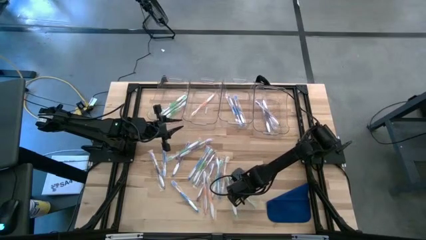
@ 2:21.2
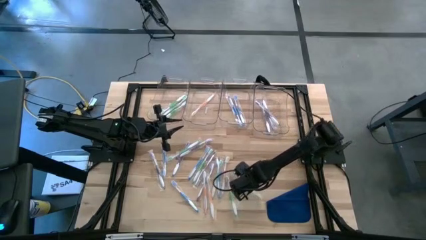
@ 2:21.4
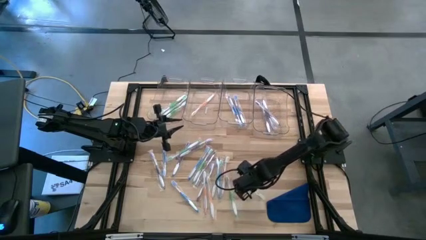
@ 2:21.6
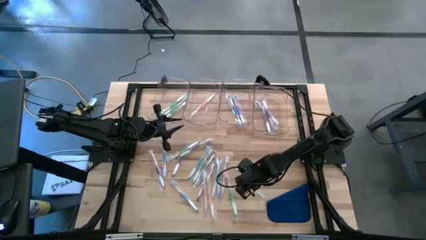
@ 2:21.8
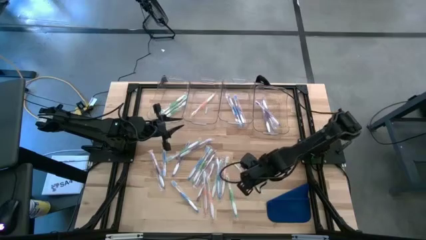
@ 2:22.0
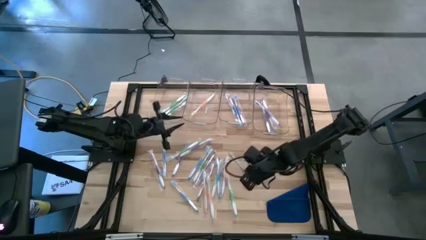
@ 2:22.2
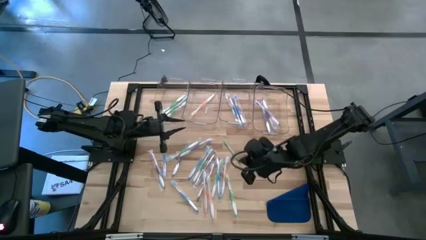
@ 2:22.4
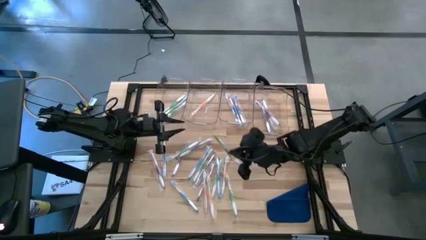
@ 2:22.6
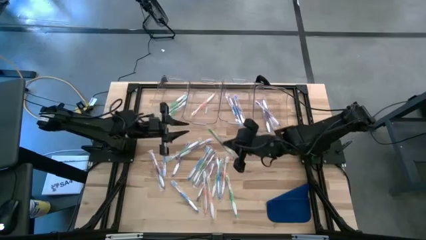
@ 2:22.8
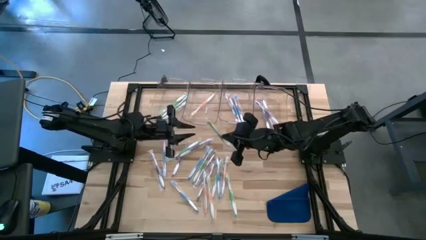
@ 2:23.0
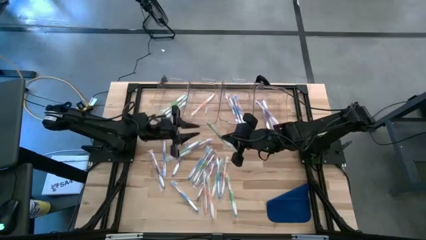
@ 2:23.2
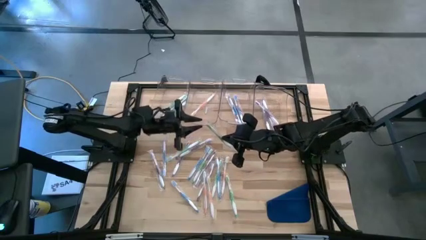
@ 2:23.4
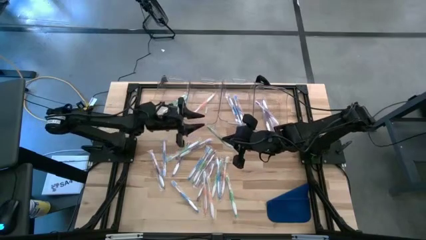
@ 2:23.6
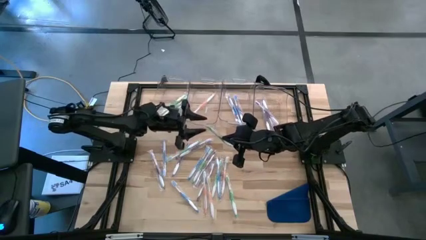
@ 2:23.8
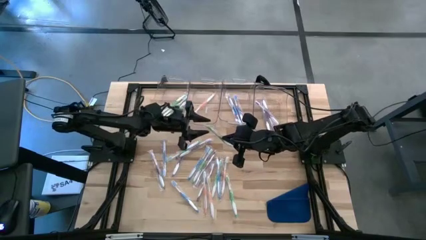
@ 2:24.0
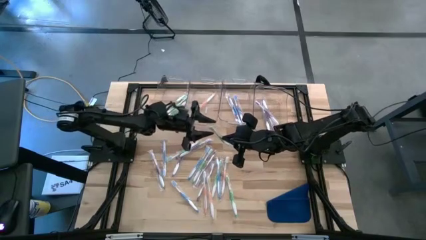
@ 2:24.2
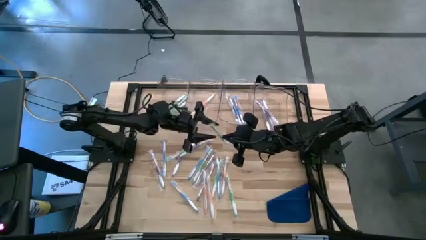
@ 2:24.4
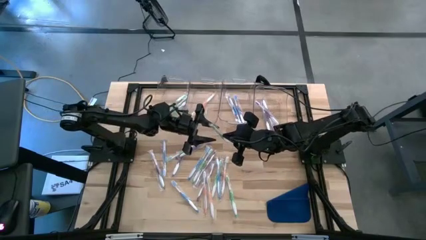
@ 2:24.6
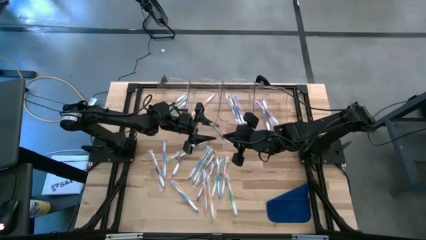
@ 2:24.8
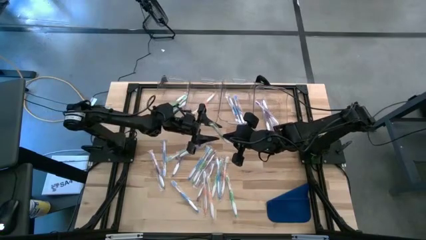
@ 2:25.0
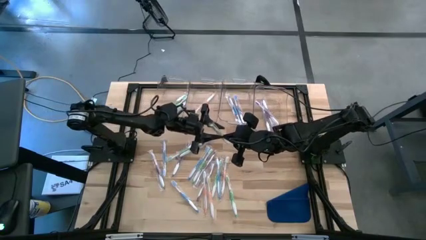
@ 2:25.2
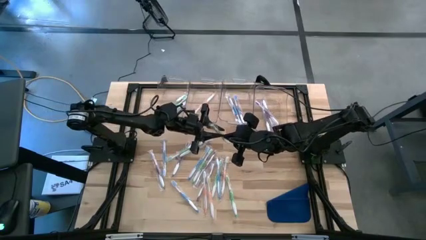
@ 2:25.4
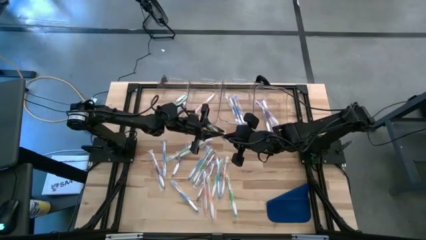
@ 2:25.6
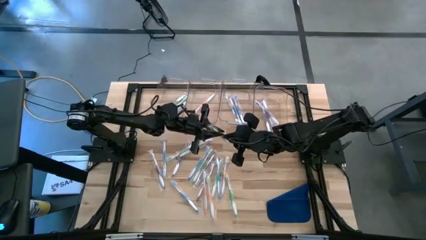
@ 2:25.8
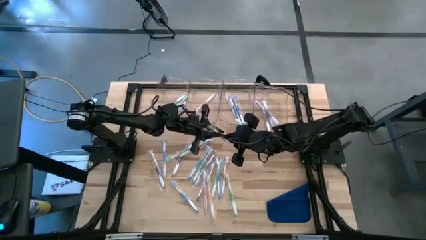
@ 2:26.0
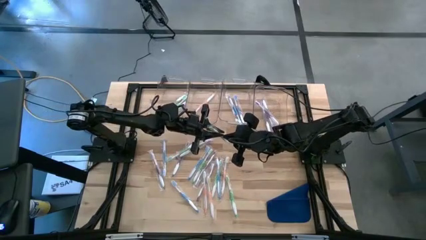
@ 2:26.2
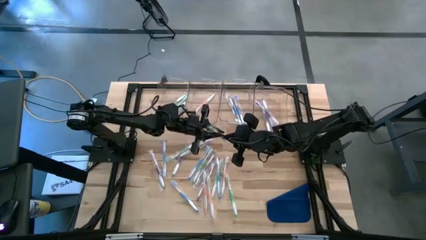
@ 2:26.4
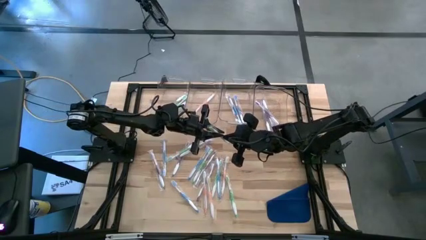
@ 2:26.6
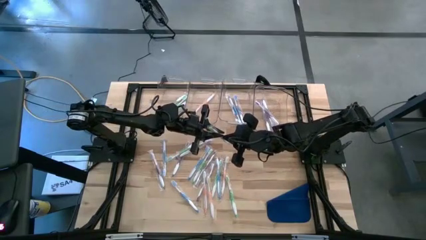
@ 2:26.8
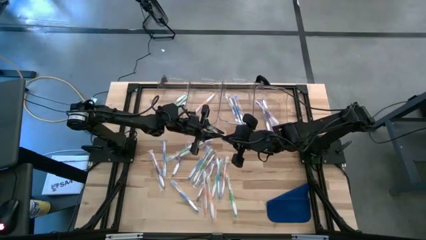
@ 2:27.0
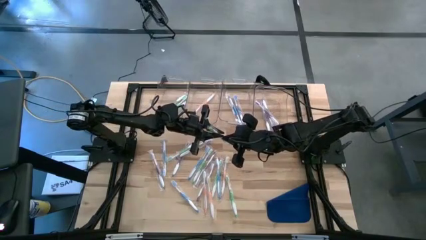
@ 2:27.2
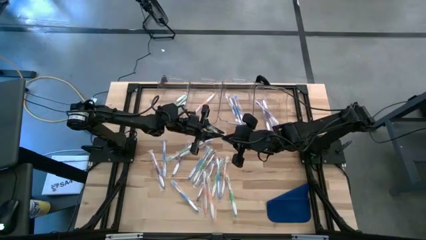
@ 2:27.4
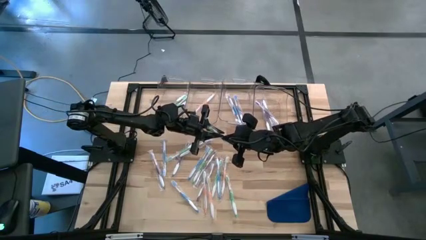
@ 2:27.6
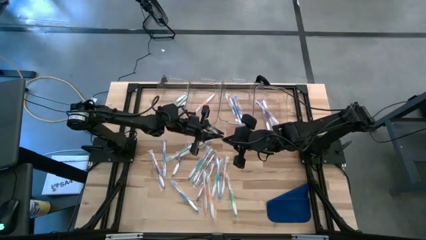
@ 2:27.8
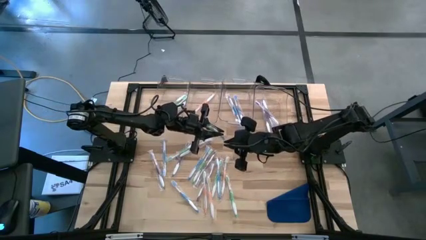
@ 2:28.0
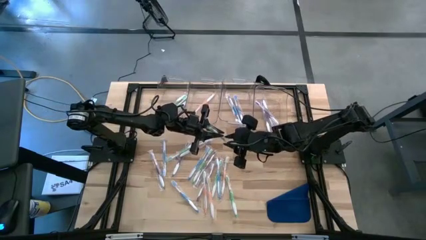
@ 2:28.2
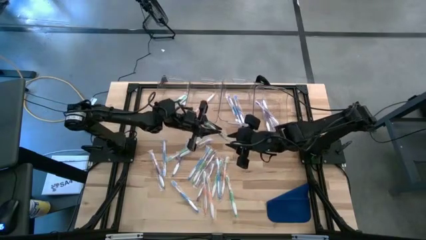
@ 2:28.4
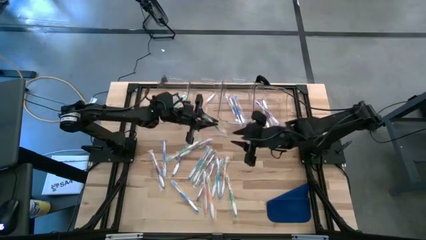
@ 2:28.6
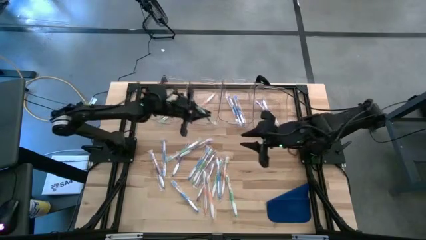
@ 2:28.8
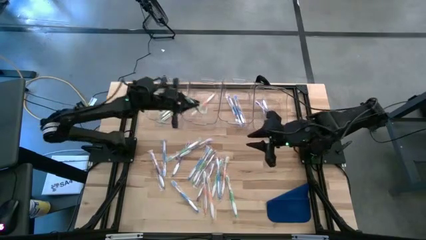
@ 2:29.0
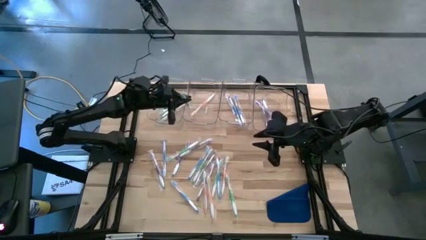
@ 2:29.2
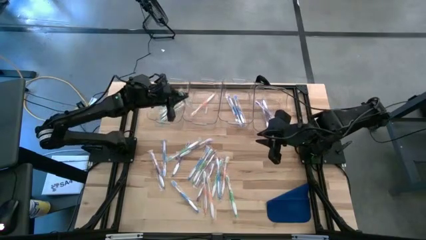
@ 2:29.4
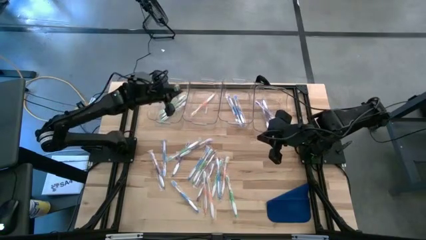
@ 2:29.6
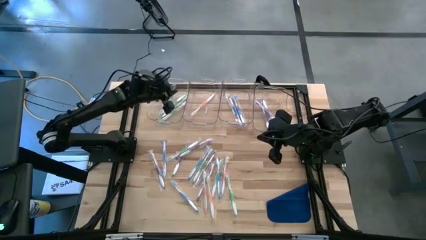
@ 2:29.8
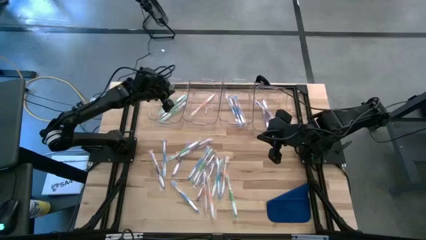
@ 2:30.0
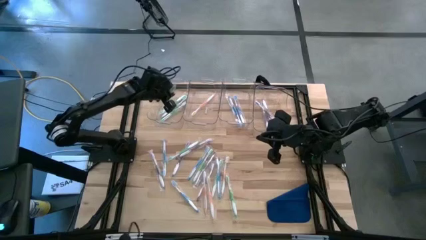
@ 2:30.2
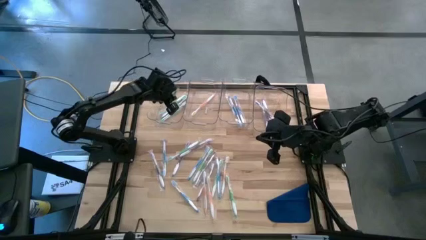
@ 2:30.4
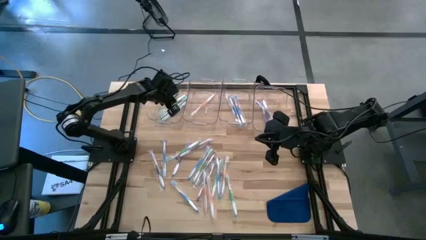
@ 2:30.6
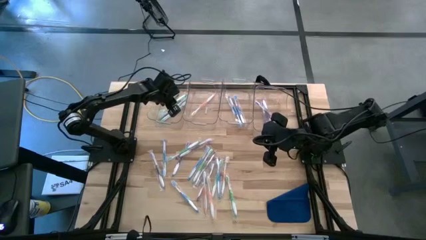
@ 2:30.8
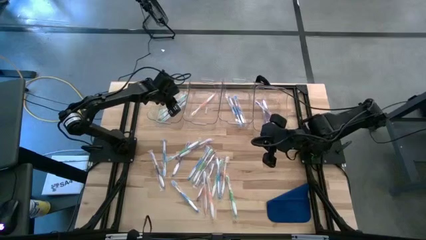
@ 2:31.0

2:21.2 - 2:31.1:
Task: Pick & Place Toothbrushes
Put the green toothbrush into the left transparent bin

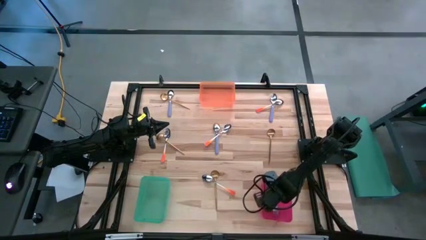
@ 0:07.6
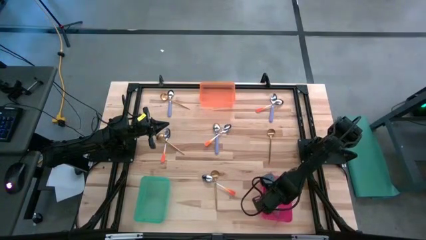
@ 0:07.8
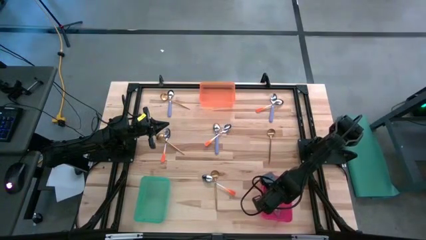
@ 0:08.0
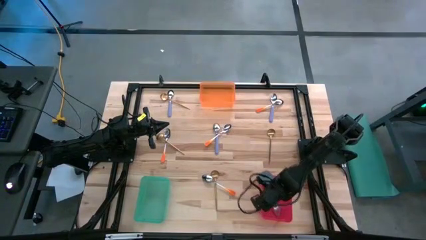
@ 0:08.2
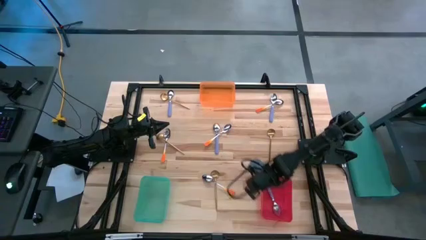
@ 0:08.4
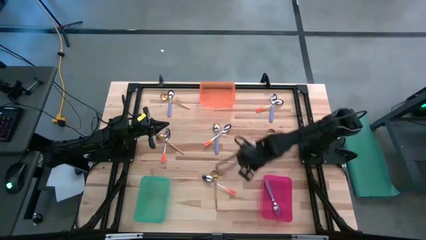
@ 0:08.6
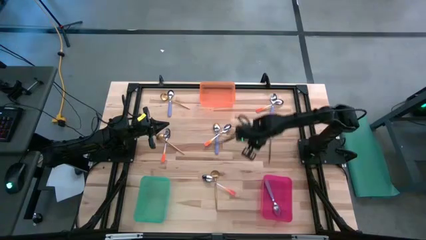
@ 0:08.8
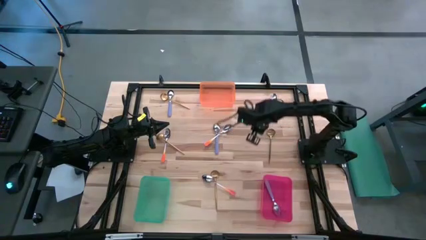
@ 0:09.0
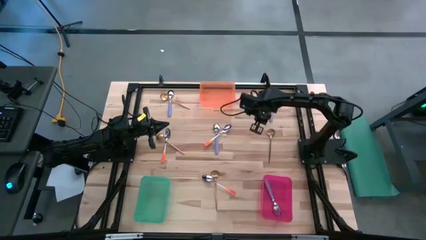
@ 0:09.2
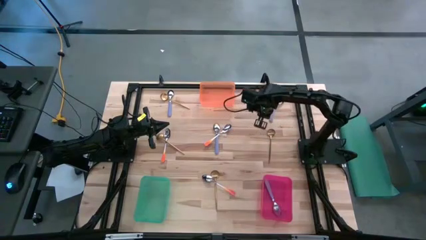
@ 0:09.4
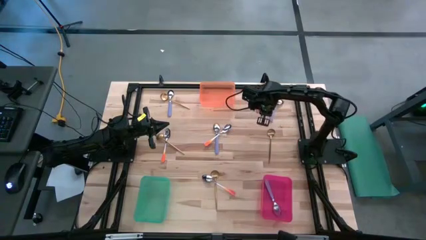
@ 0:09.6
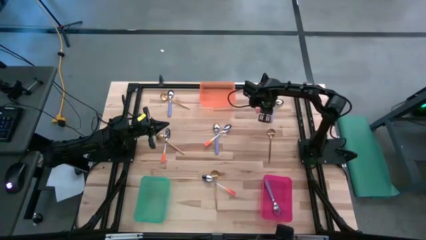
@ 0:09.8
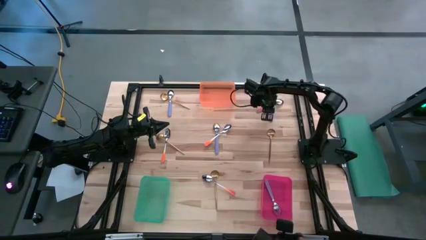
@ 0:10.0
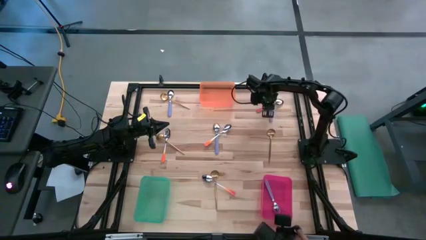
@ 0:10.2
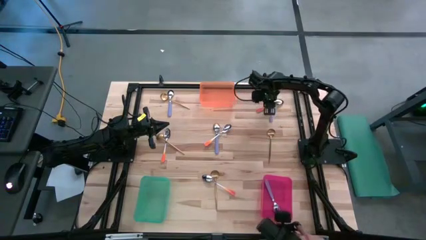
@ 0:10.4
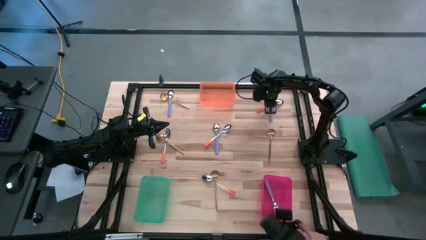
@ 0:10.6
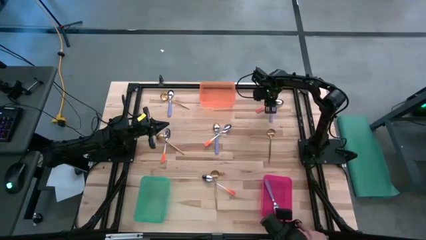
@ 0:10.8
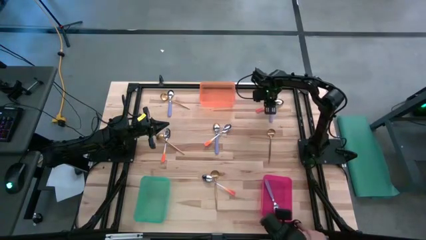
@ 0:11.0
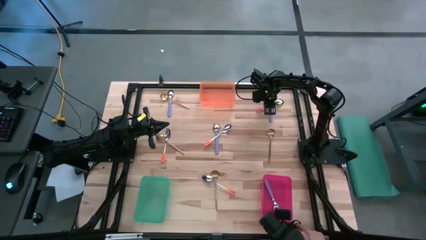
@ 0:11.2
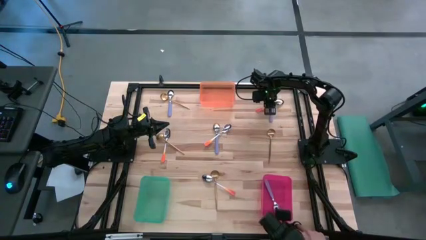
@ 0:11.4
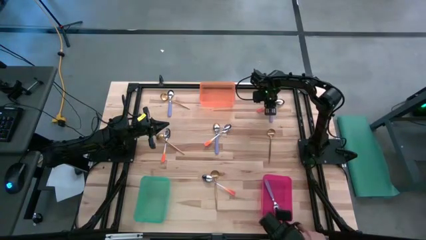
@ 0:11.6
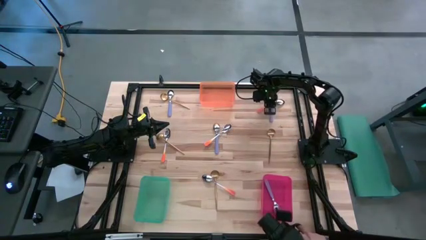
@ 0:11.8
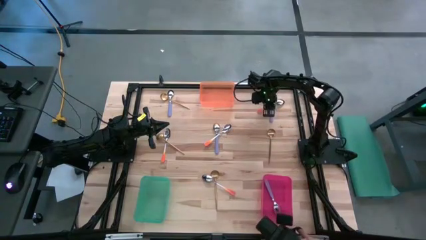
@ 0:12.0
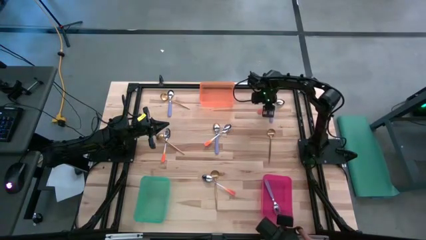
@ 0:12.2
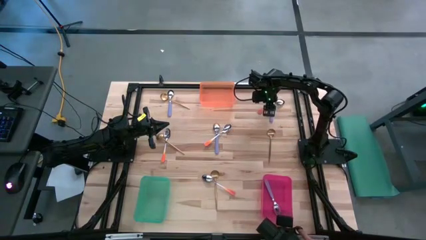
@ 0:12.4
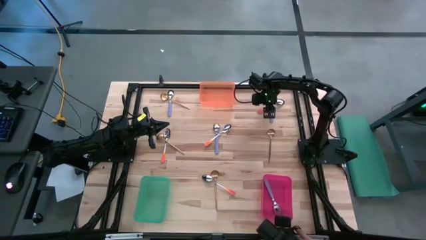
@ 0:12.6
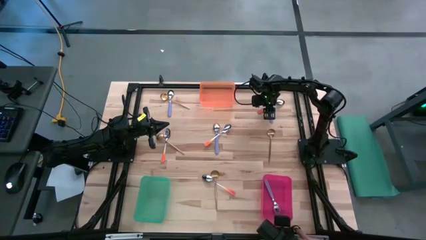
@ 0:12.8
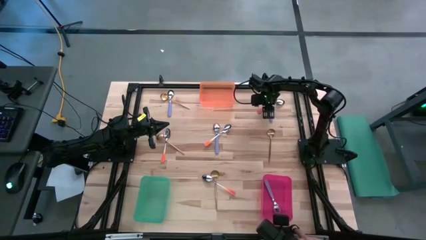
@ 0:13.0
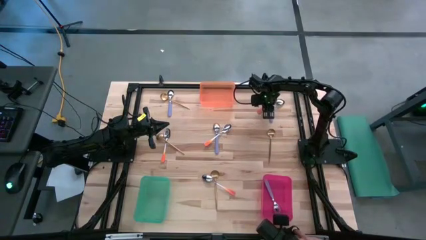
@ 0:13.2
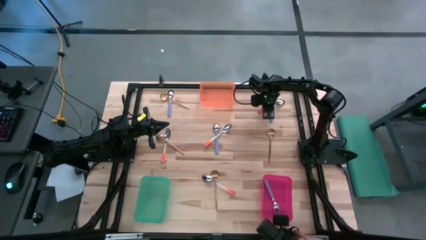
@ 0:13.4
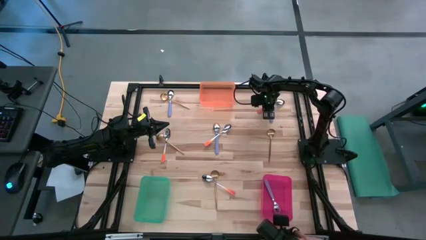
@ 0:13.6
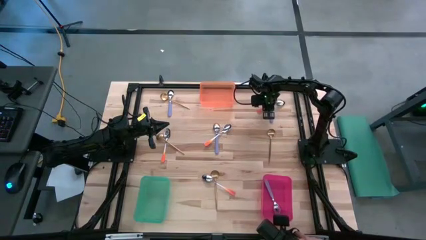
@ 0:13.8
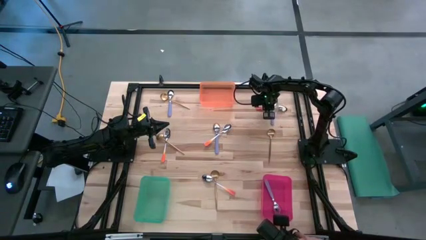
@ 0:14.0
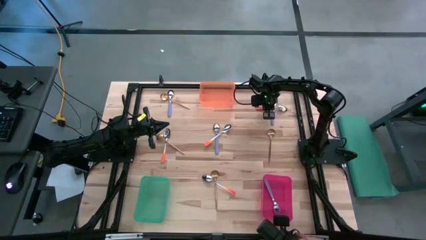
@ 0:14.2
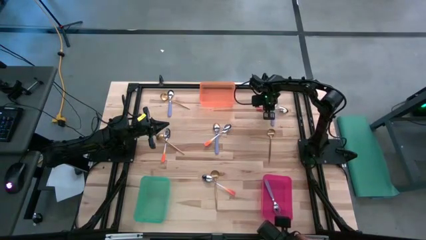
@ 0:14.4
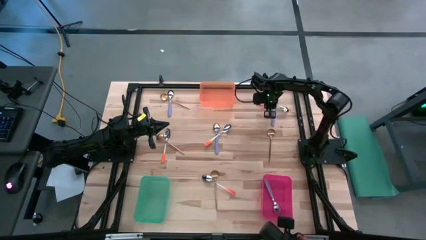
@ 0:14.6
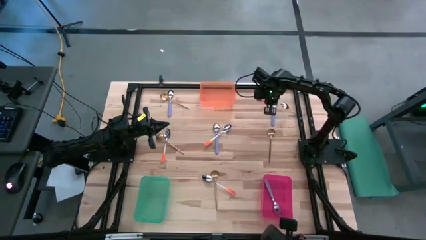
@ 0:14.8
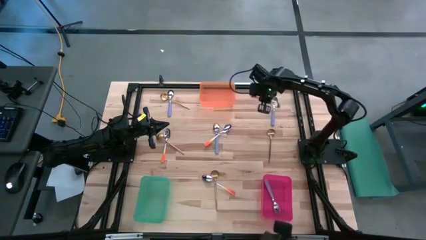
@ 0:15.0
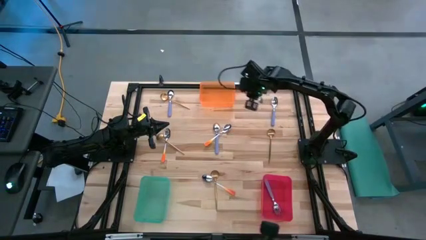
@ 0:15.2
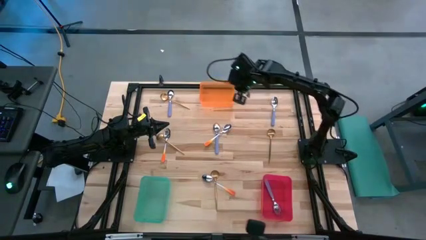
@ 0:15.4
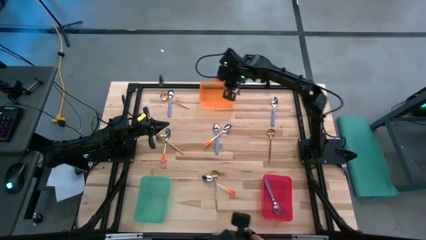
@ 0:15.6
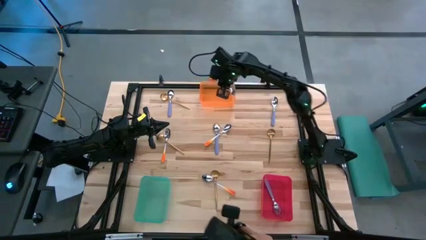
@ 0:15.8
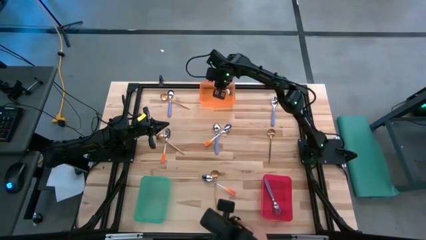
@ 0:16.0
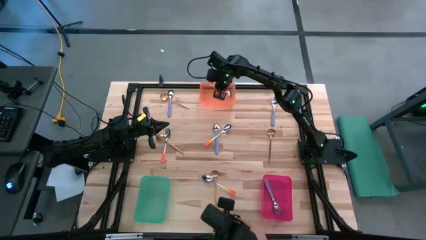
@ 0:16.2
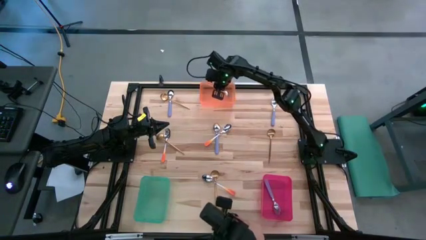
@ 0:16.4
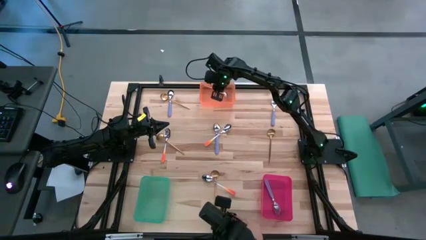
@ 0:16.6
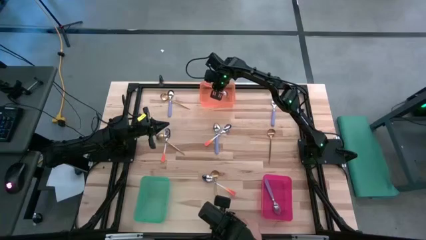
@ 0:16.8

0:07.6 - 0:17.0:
Task: Sort silverware by color (type)
Put the orange spoon into the orange bin
